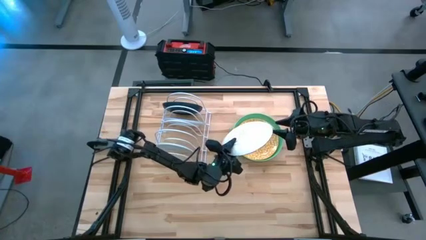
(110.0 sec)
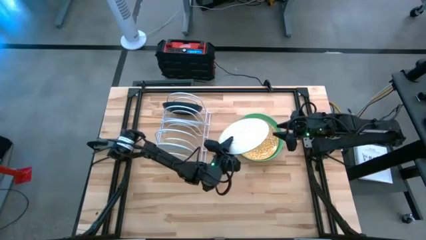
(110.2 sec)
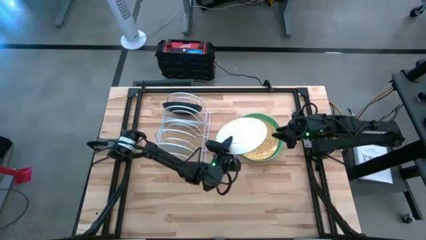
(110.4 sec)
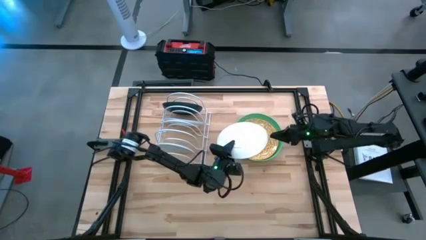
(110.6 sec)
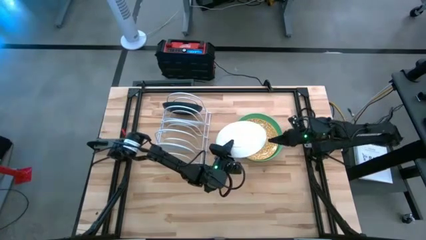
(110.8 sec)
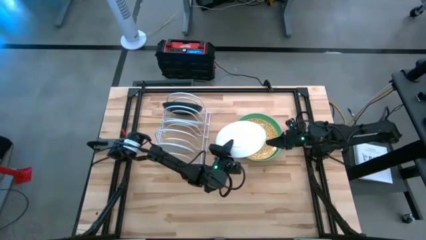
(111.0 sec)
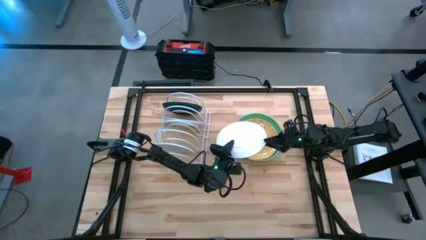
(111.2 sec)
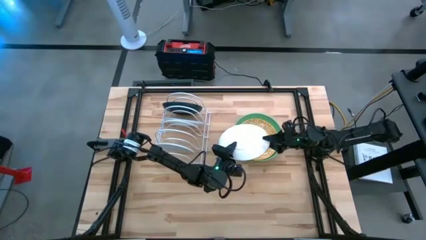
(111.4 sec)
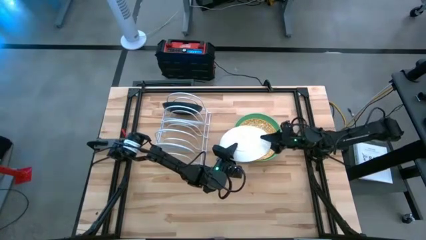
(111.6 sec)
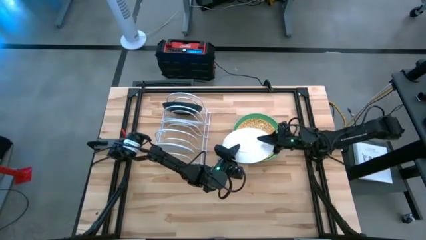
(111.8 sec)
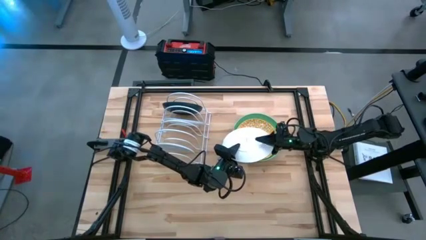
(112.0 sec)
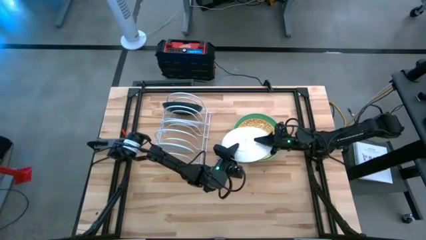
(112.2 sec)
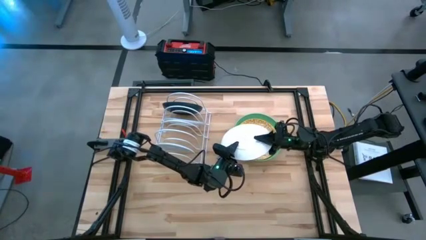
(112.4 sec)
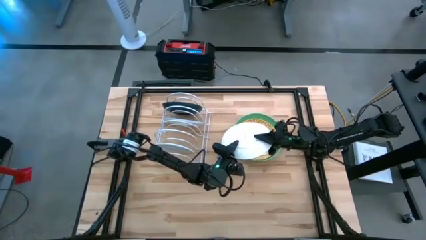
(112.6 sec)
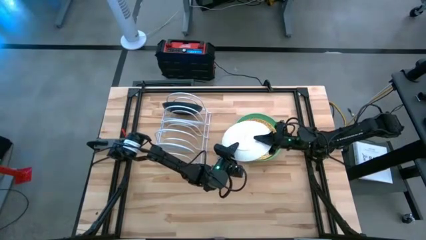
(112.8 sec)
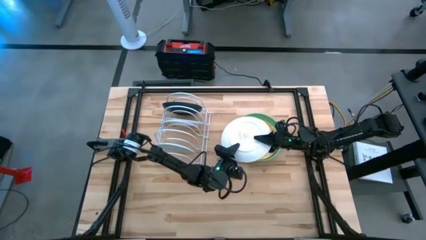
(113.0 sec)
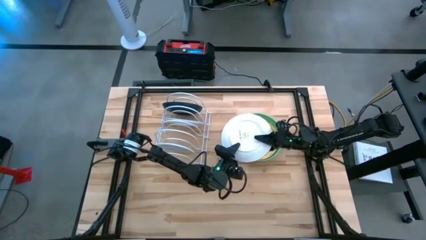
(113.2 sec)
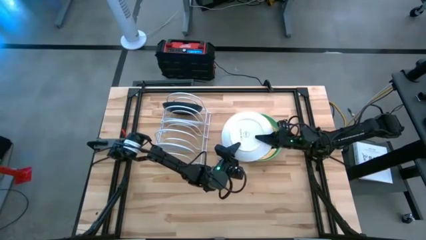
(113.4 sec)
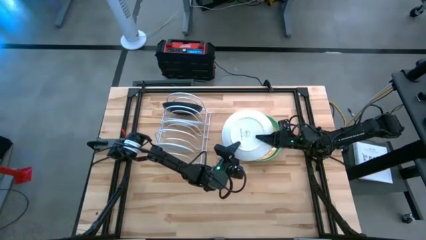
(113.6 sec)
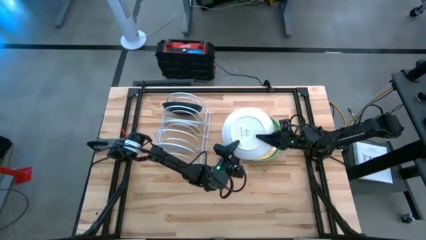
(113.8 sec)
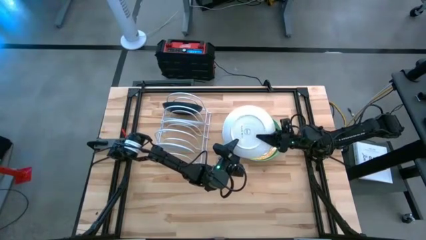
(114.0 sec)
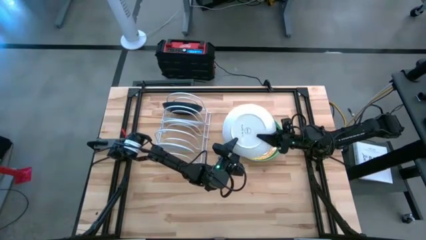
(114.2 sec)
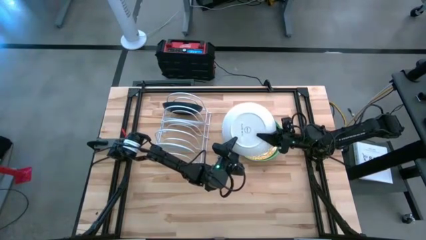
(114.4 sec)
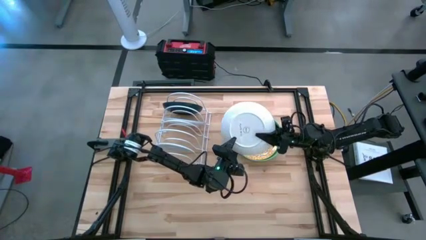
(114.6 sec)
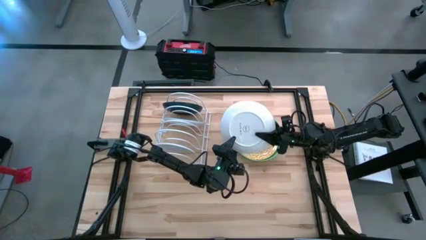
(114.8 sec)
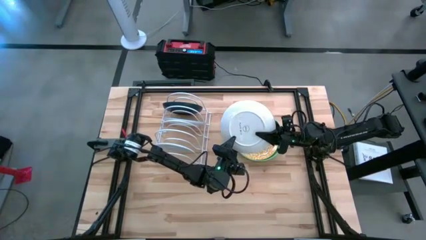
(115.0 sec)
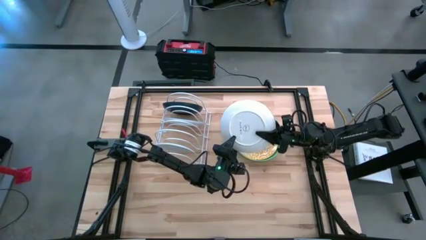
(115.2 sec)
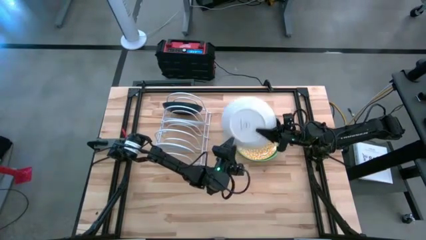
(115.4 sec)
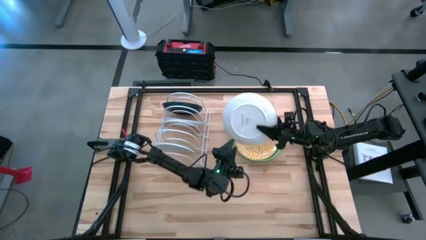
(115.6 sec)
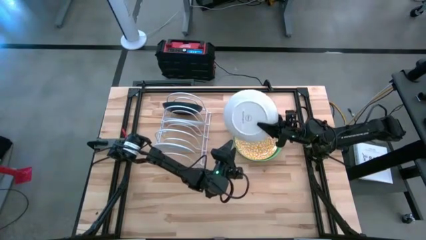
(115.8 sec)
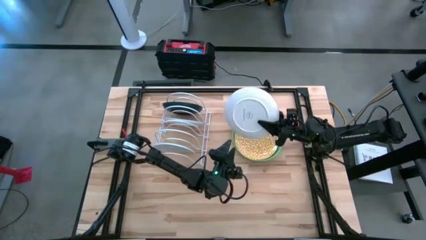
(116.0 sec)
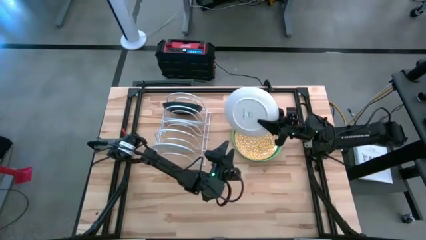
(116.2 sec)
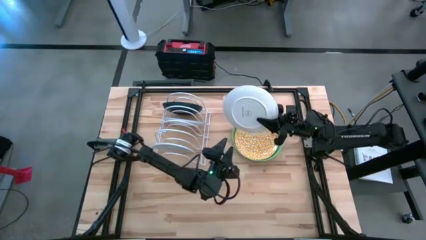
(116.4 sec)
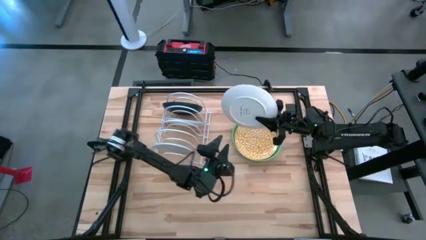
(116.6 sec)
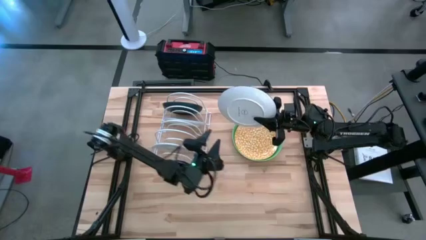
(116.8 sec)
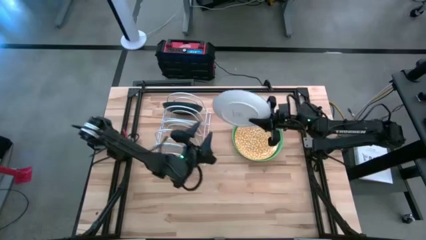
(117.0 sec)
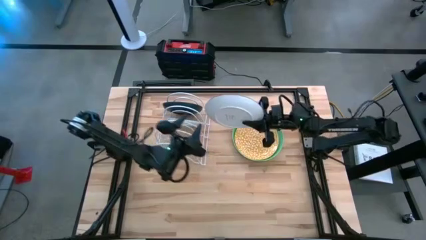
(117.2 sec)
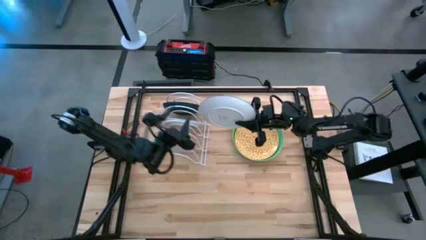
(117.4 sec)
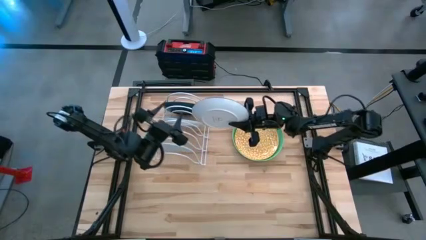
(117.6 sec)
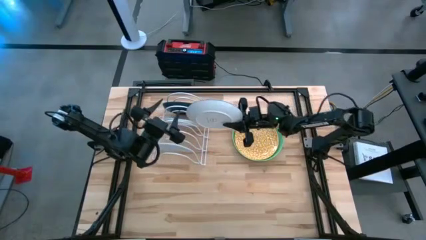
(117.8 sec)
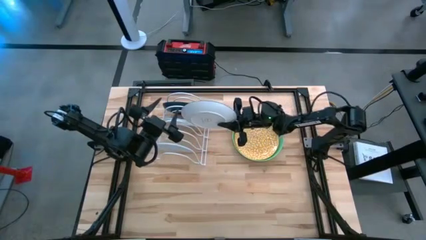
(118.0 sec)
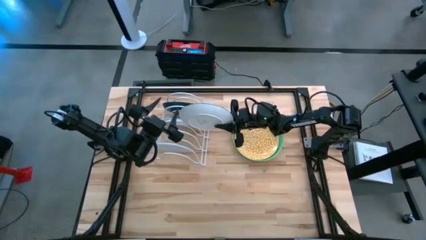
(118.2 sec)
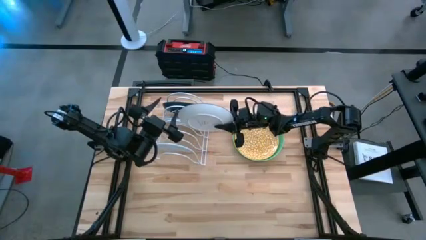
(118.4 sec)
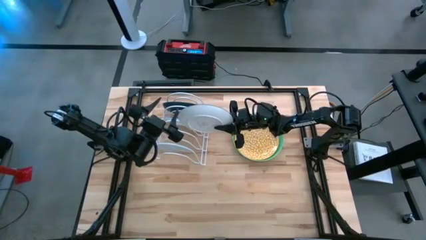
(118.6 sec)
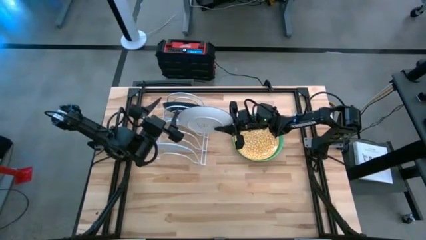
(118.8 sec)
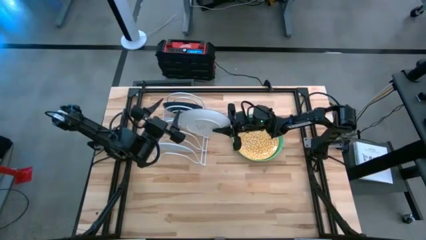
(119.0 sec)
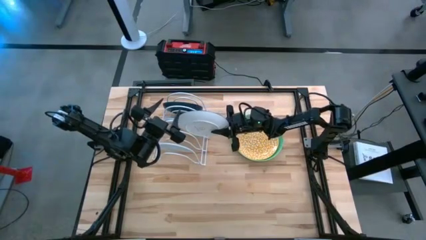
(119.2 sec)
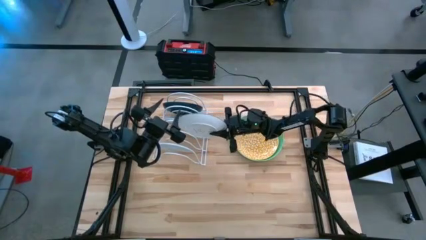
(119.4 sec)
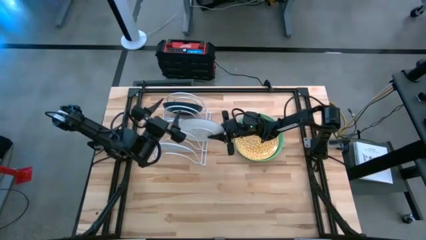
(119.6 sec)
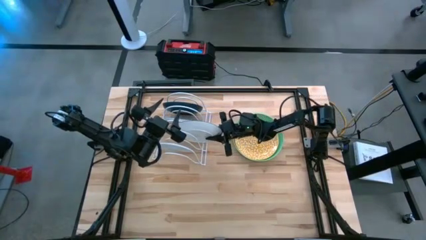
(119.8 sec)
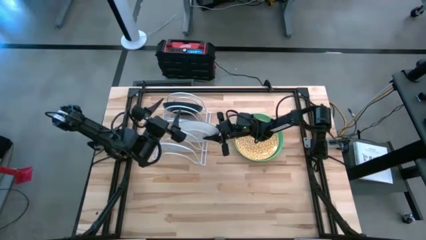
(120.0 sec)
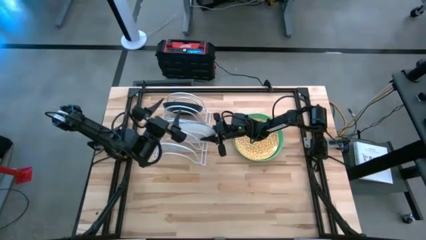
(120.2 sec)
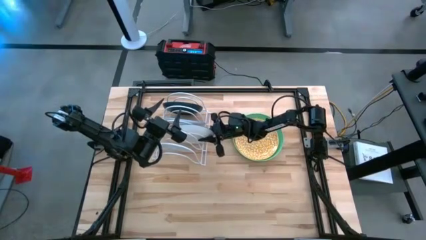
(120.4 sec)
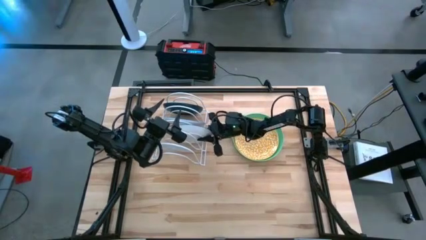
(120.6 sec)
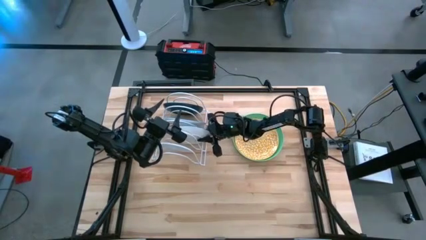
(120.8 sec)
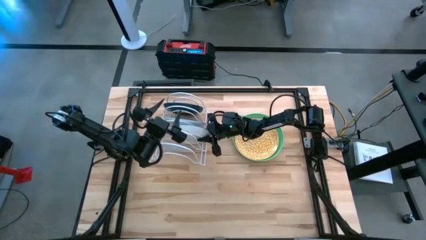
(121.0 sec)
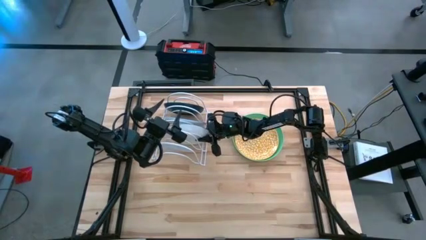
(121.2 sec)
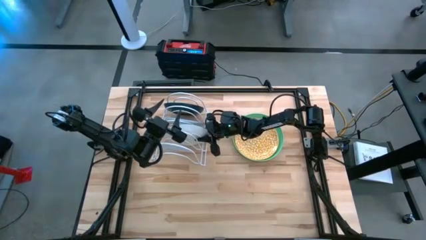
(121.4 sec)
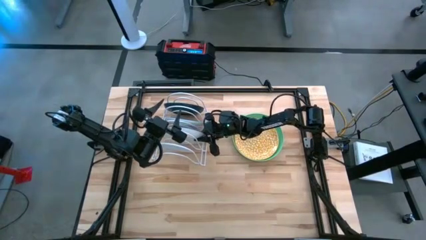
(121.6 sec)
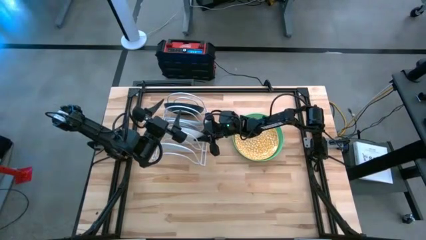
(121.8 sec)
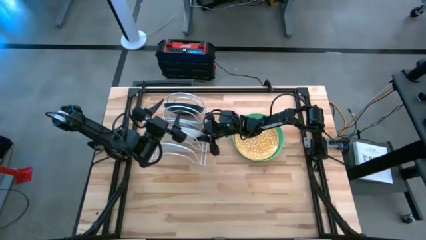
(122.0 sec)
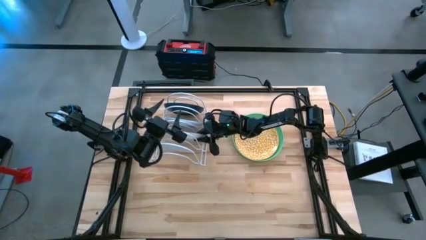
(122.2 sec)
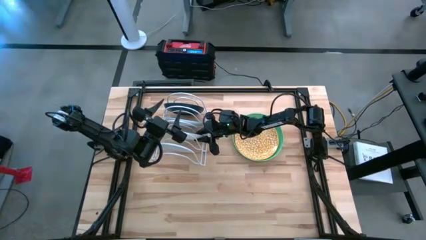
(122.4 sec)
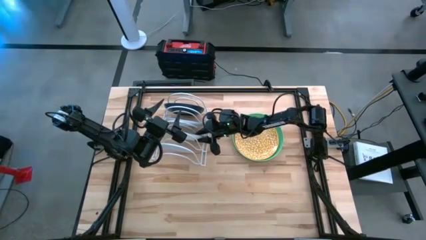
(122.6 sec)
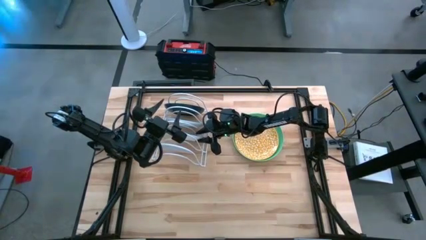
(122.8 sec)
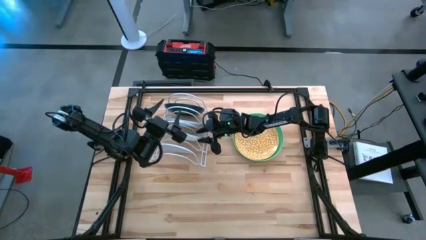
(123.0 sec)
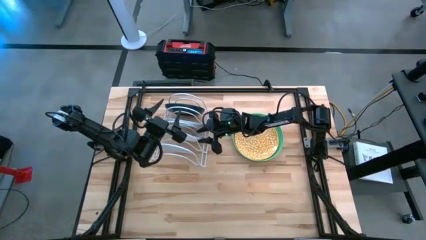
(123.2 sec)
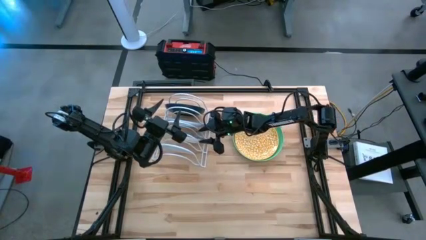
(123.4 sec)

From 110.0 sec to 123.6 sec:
Task: Sort dishes
Put the blue pattern plate in the dish rack
